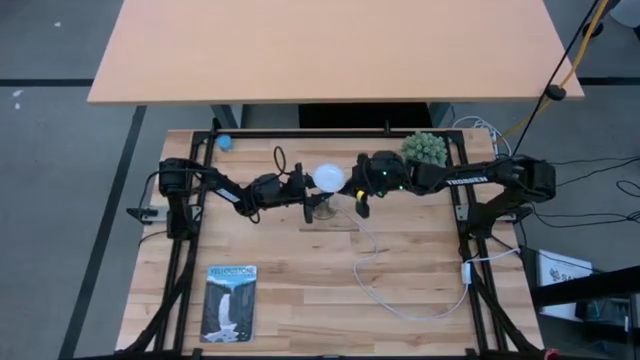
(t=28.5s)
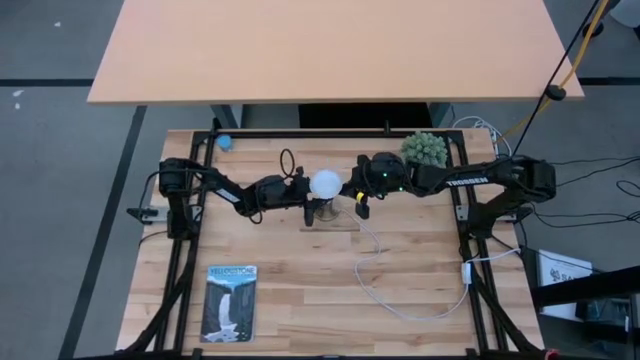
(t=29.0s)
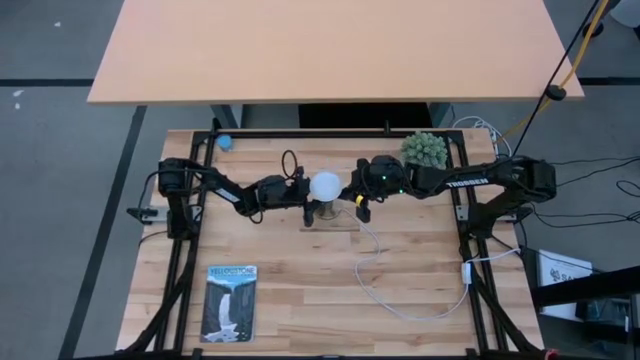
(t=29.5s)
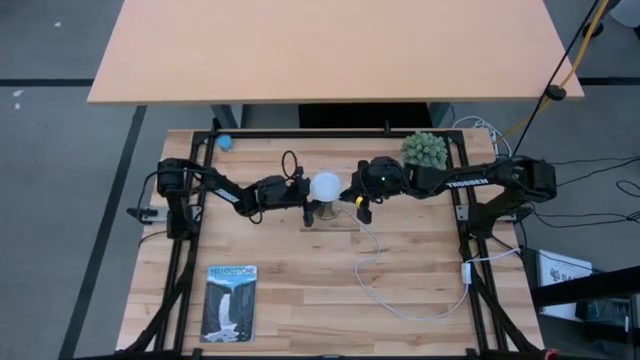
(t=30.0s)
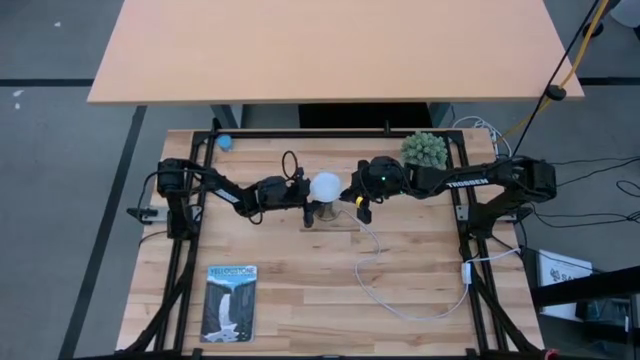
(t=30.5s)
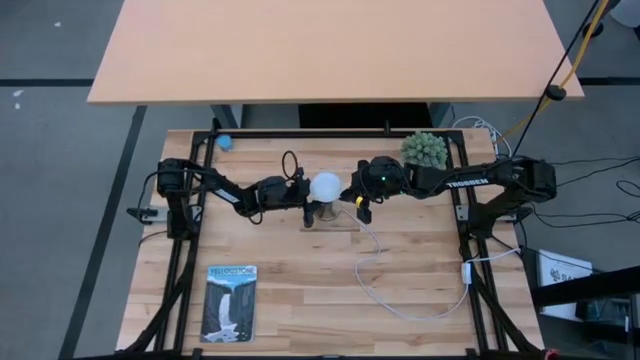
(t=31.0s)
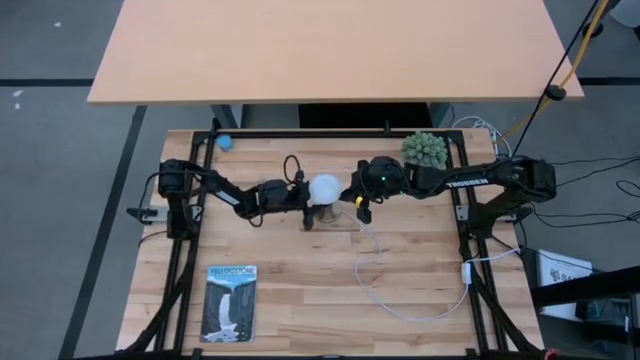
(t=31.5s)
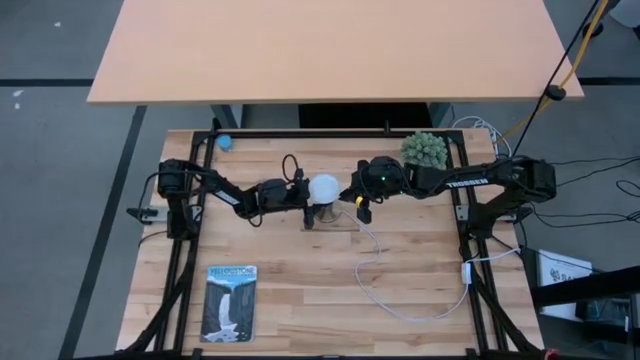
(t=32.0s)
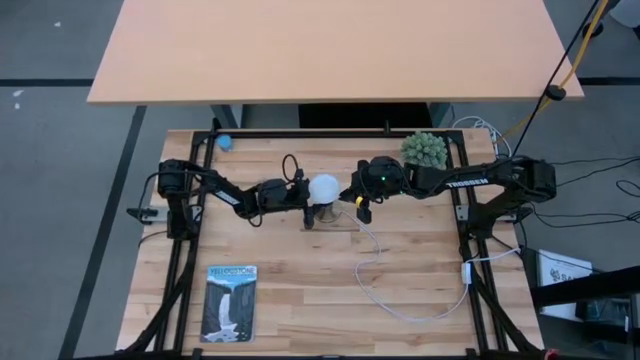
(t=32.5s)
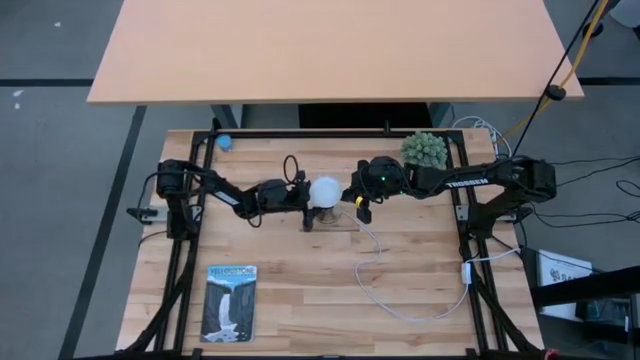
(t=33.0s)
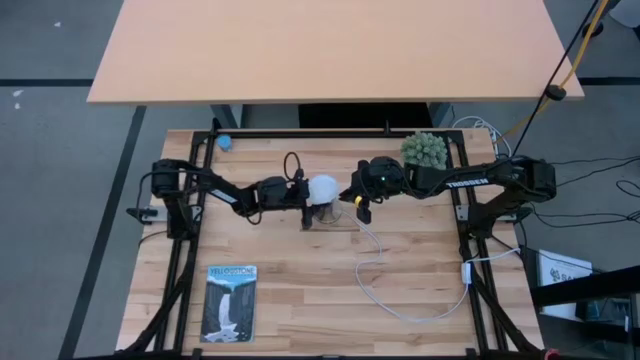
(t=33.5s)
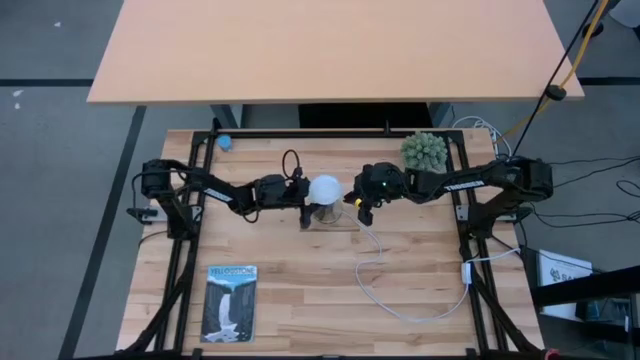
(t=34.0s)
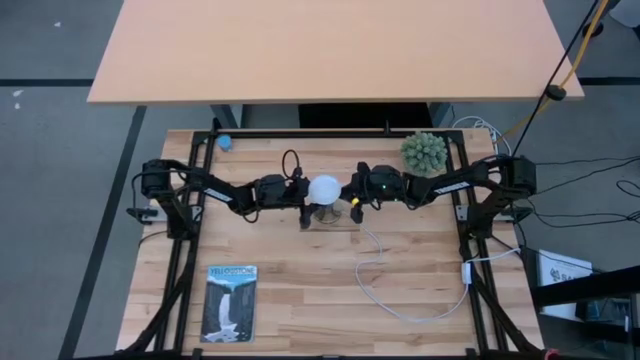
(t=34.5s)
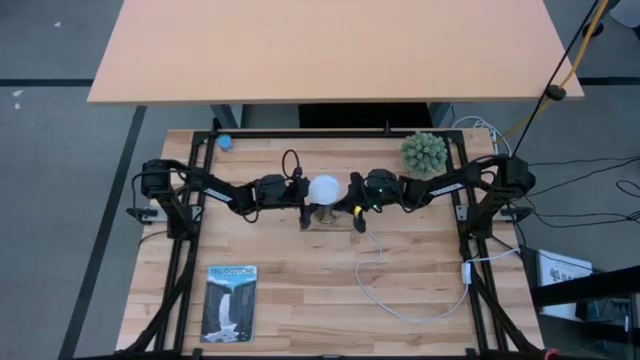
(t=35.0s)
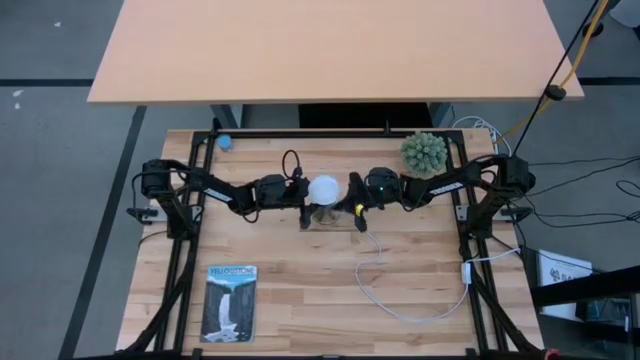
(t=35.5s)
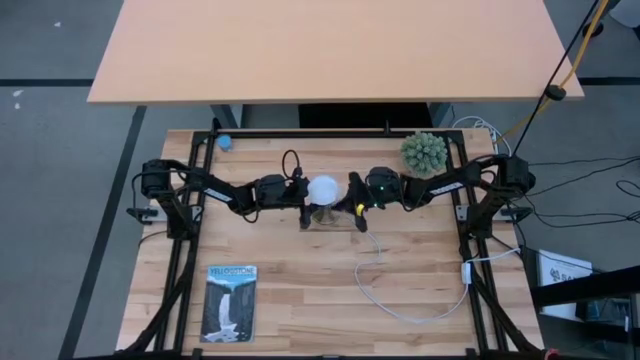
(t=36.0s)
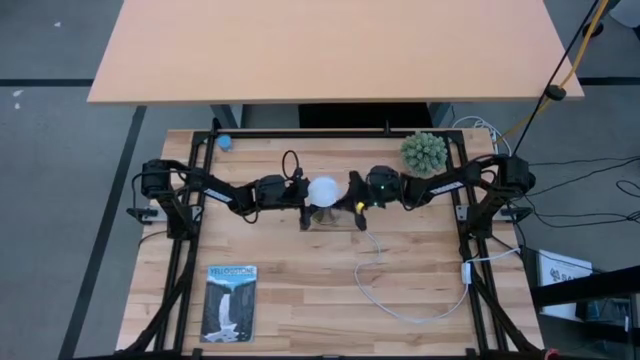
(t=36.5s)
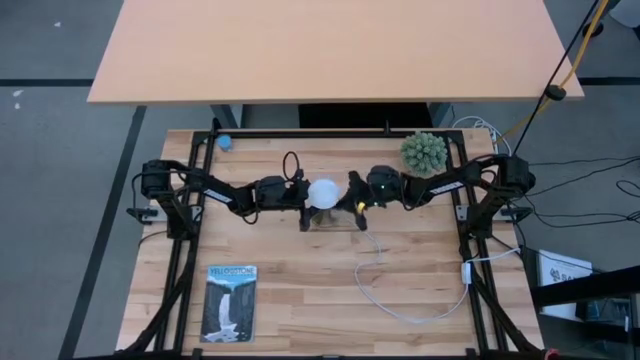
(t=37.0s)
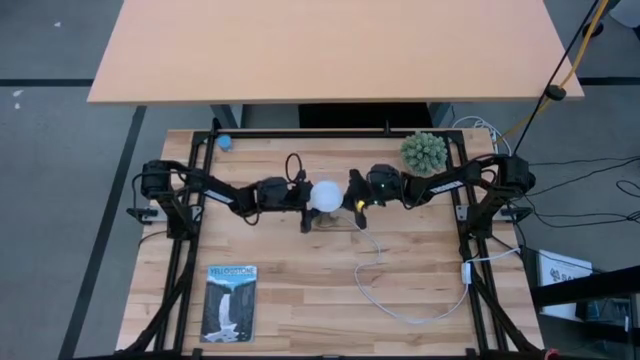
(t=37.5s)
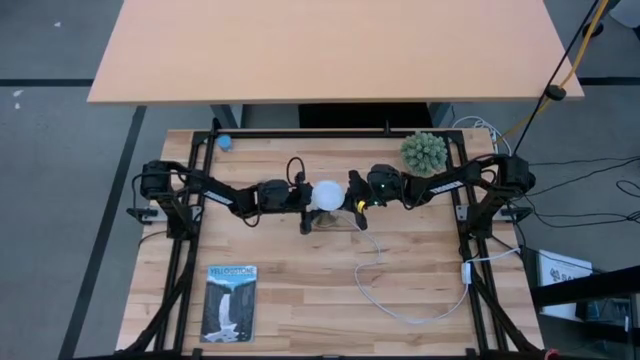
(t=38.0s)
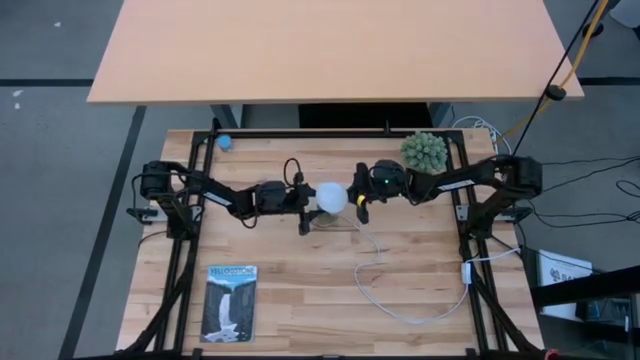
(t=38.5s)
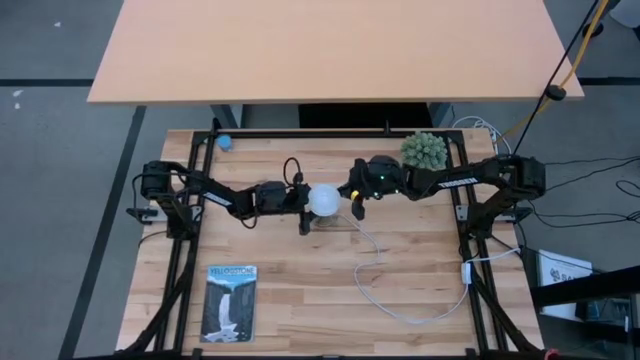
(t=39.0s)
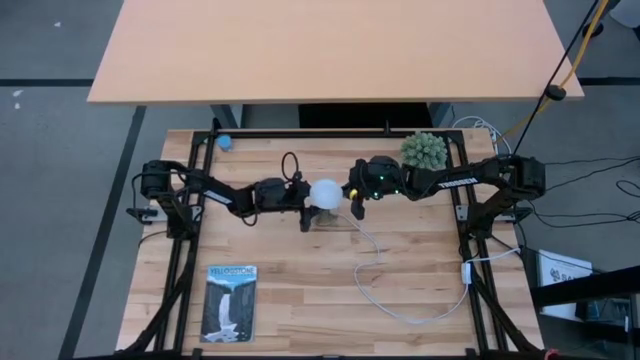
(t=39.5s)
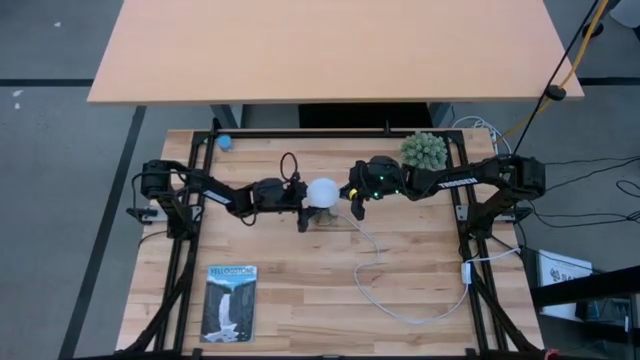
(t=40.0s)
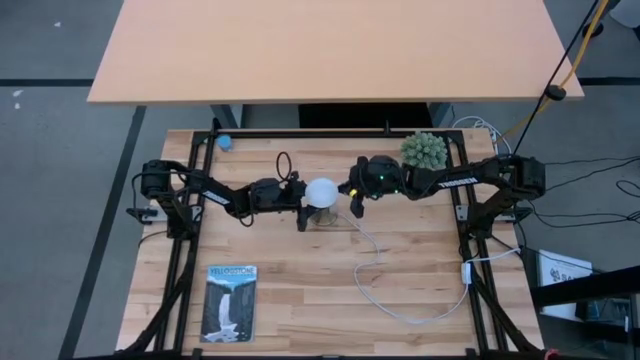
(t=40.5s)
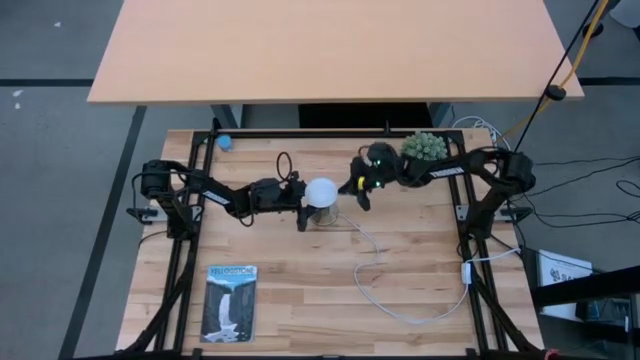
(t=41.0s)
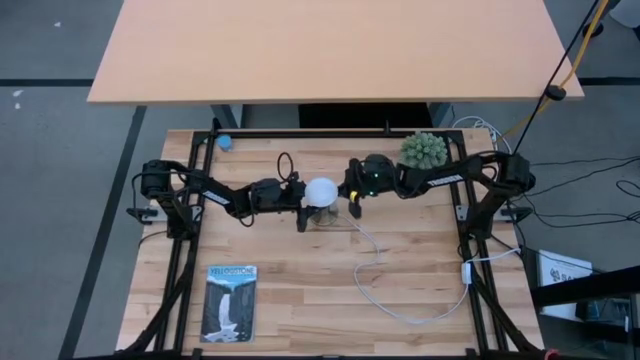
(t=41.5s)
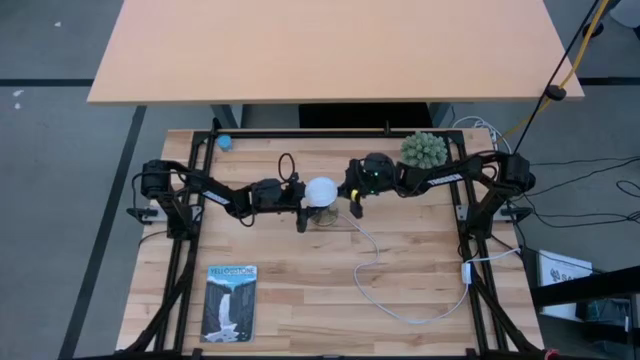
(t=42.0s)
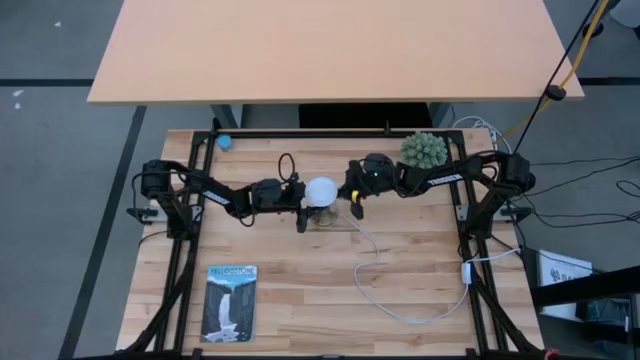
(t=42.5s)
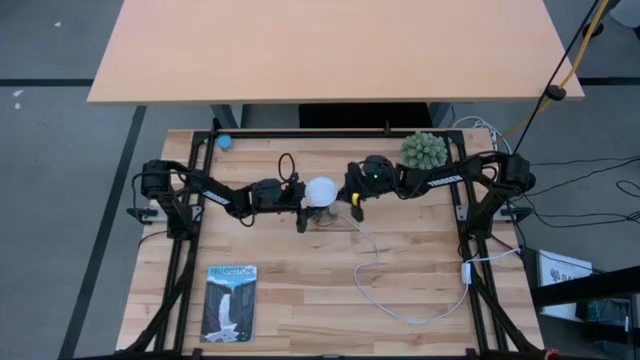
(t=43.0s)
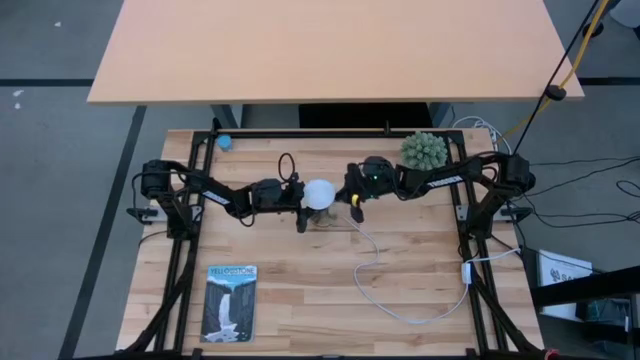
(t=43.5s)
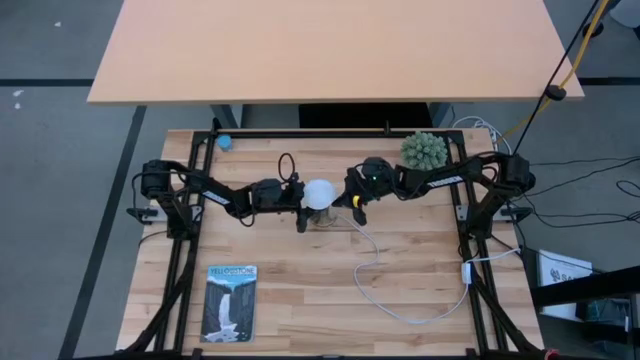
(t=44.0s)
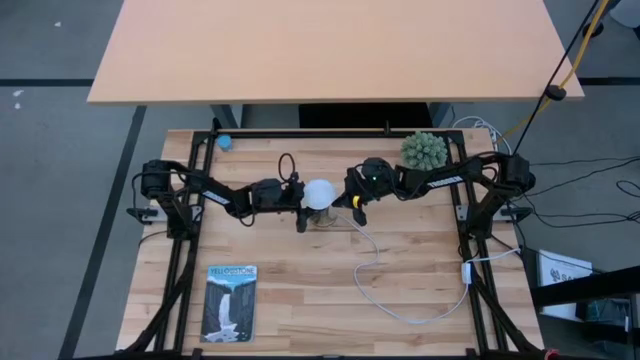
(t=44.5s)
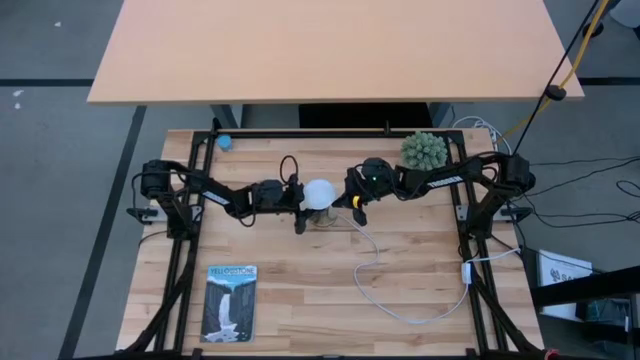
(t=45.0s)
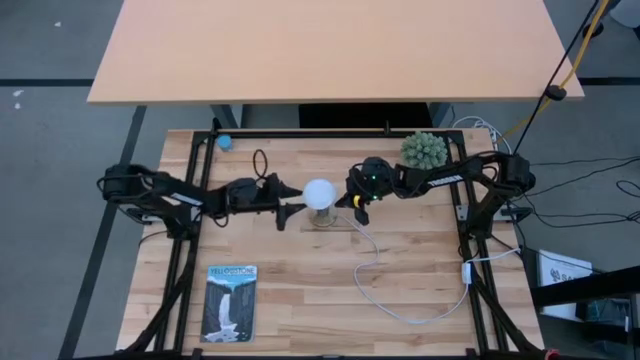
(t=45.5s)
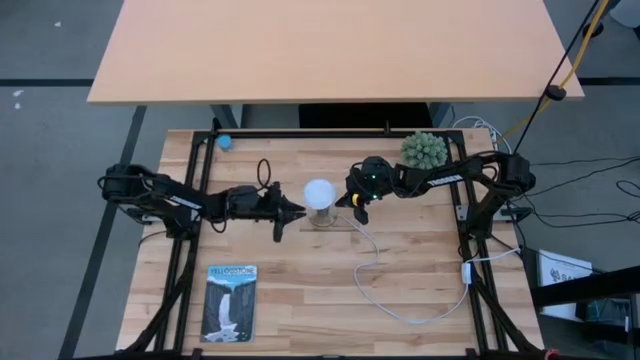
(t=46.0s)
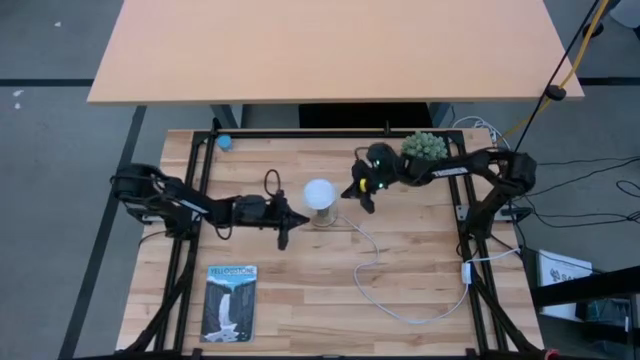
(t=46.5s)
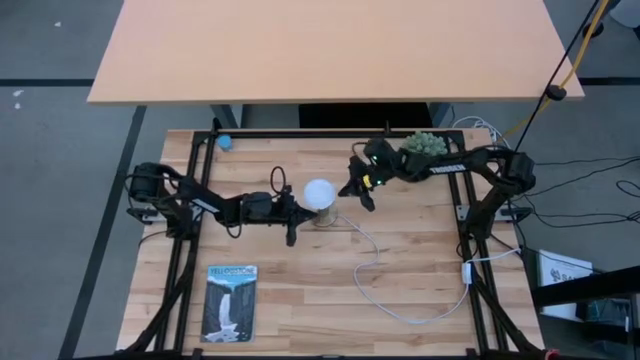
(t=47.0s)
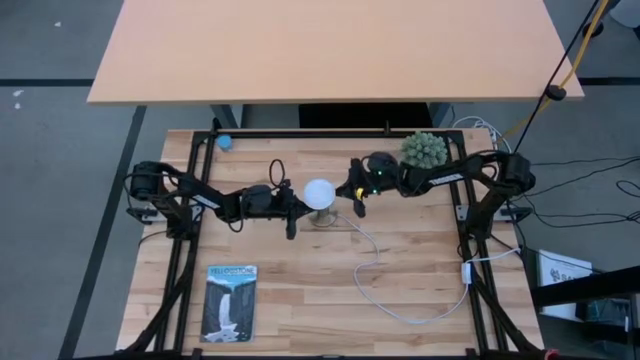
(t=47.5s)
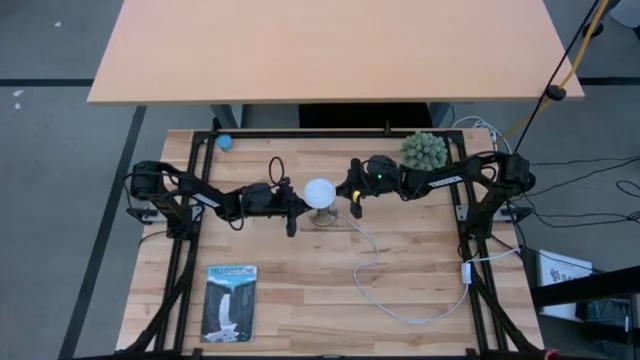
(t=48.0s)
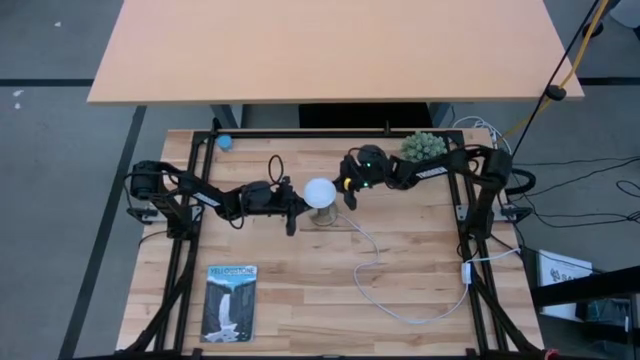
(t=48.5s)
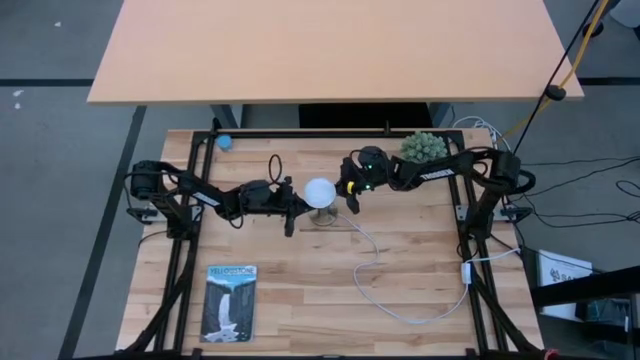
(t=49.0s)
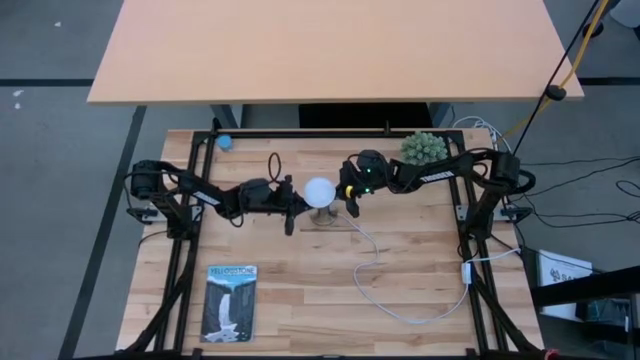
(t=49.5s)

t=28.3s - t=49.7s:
Task: Screw lightbulb
Insert the lightbulb into the lamp
